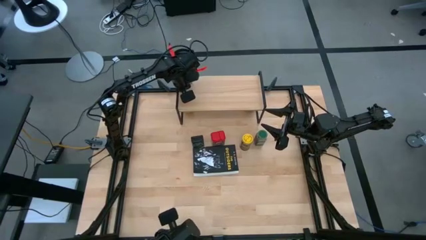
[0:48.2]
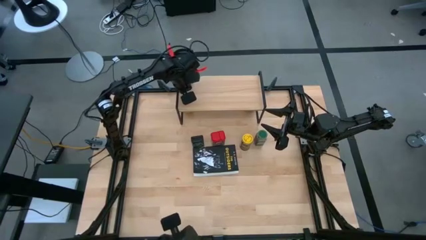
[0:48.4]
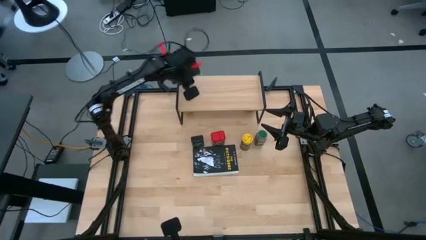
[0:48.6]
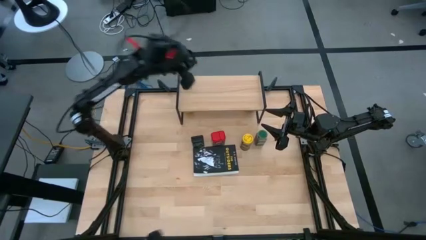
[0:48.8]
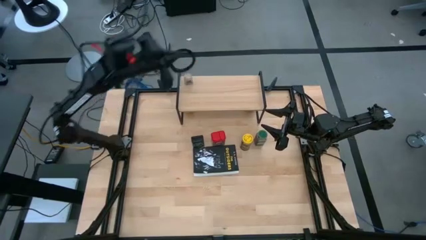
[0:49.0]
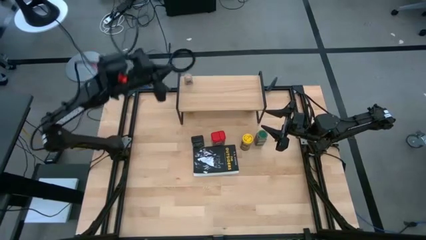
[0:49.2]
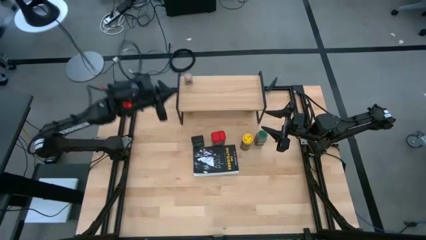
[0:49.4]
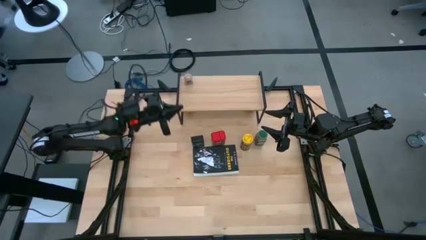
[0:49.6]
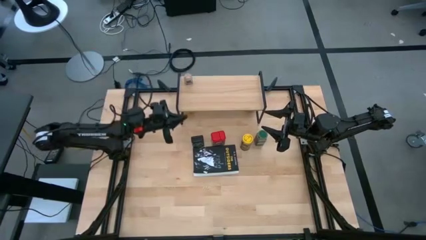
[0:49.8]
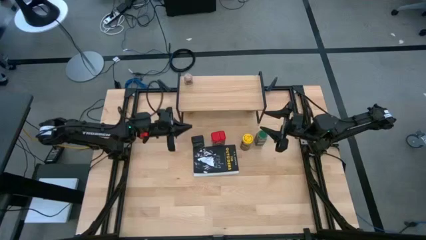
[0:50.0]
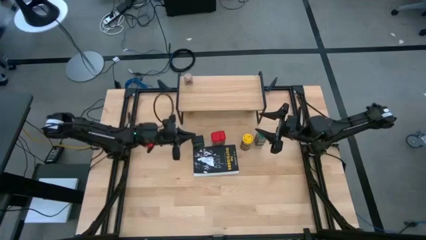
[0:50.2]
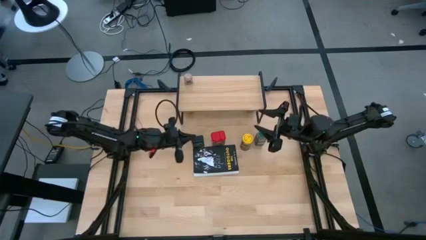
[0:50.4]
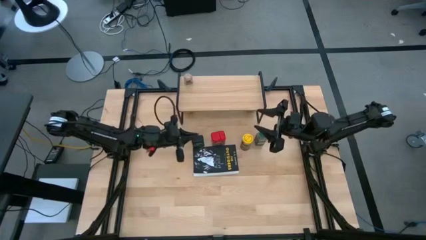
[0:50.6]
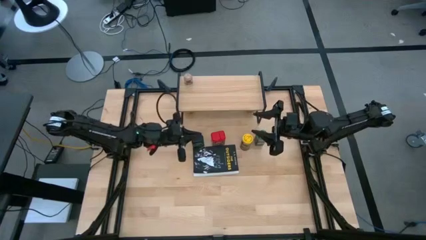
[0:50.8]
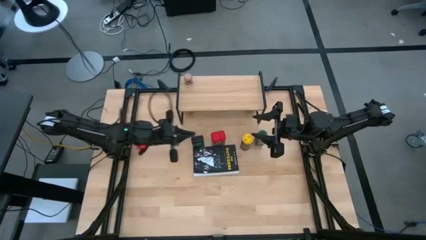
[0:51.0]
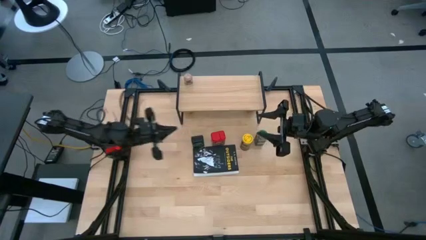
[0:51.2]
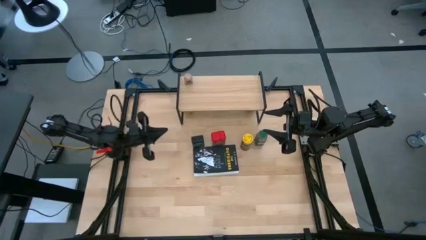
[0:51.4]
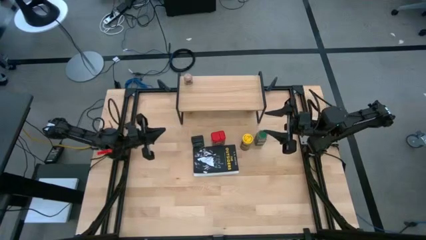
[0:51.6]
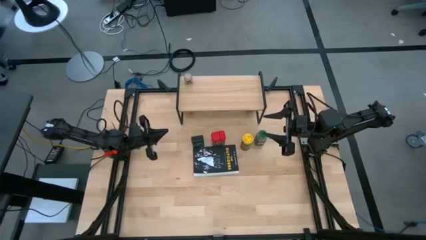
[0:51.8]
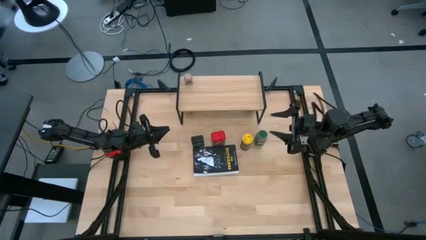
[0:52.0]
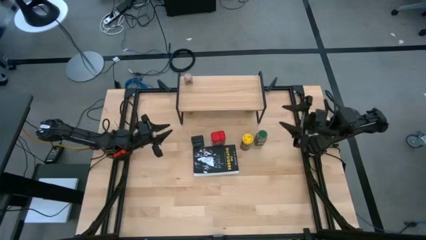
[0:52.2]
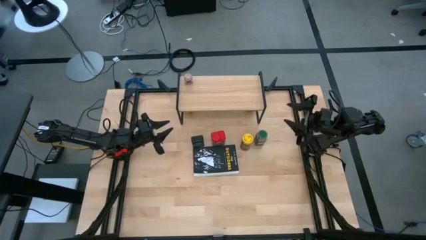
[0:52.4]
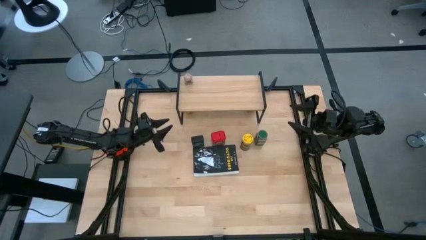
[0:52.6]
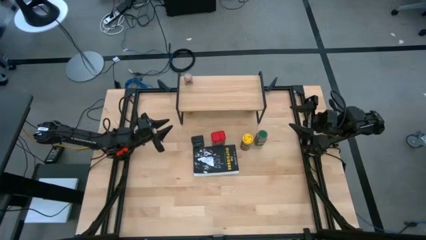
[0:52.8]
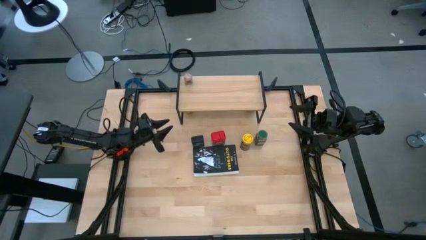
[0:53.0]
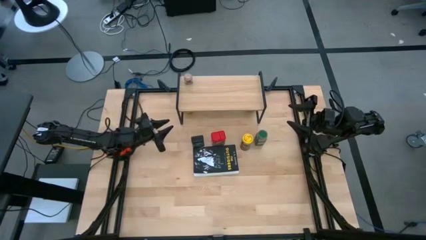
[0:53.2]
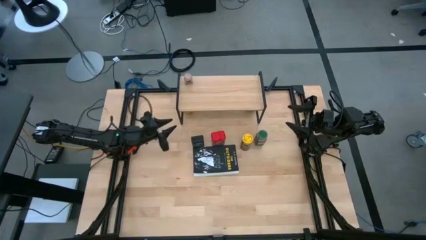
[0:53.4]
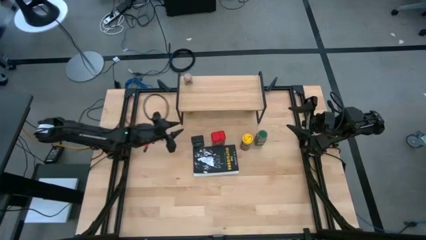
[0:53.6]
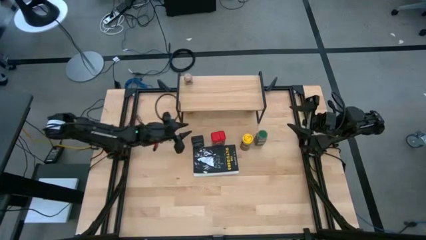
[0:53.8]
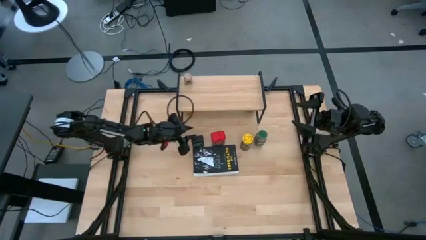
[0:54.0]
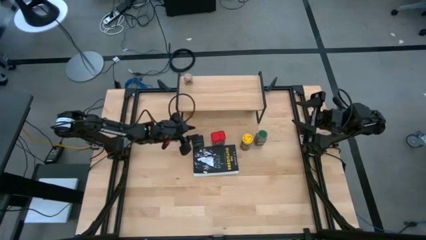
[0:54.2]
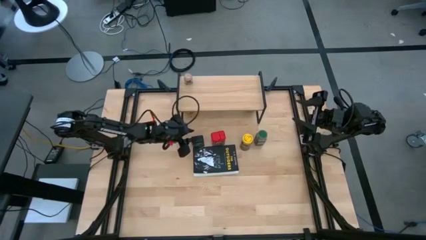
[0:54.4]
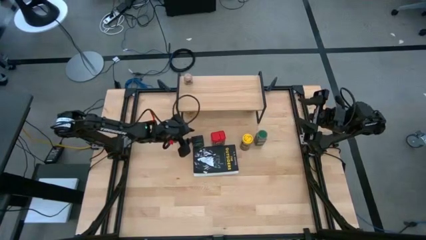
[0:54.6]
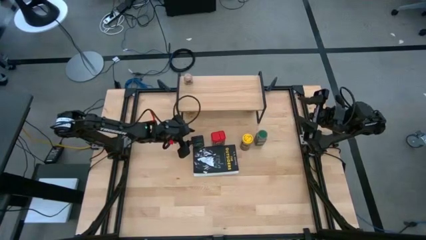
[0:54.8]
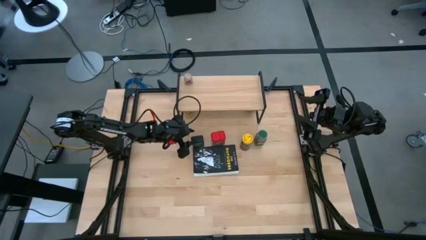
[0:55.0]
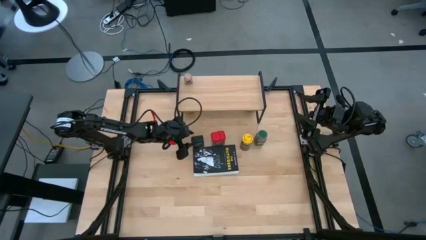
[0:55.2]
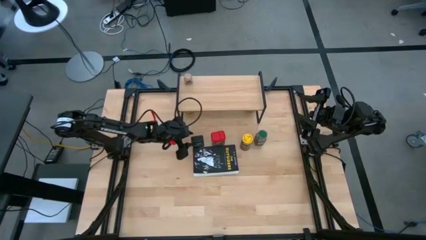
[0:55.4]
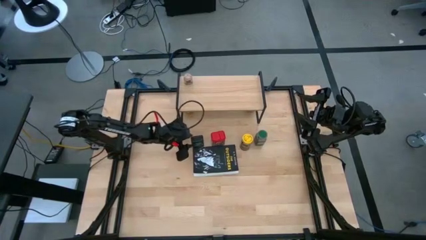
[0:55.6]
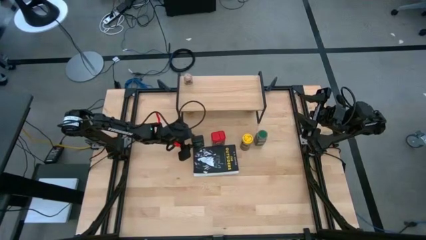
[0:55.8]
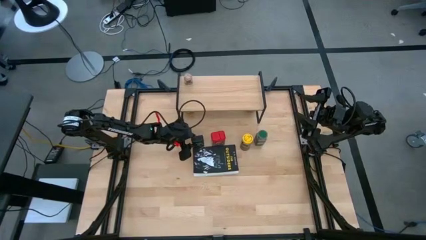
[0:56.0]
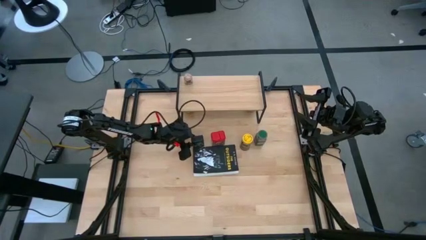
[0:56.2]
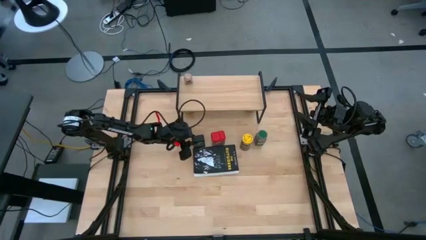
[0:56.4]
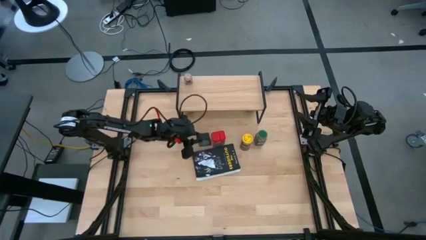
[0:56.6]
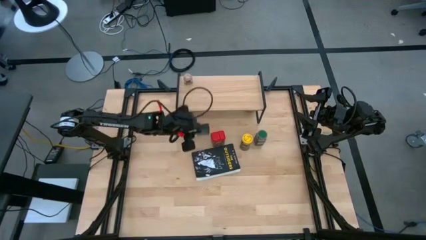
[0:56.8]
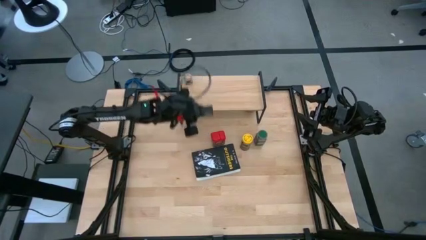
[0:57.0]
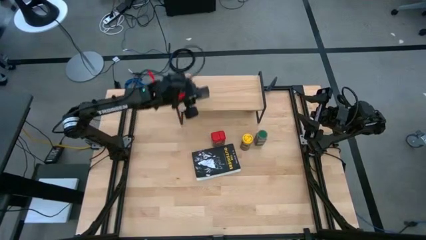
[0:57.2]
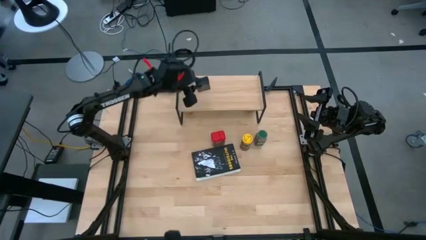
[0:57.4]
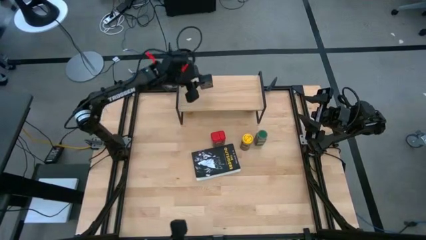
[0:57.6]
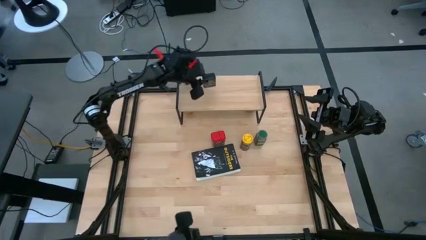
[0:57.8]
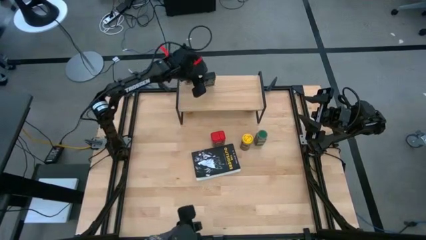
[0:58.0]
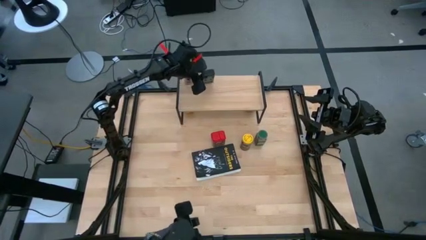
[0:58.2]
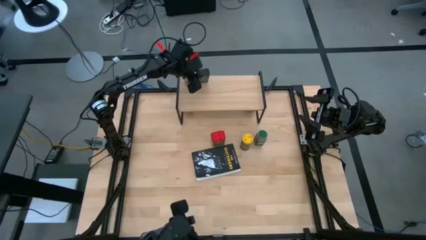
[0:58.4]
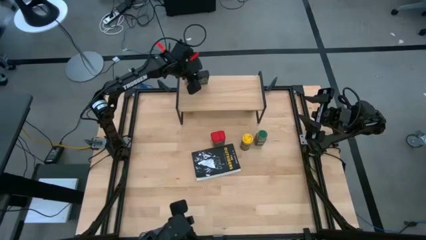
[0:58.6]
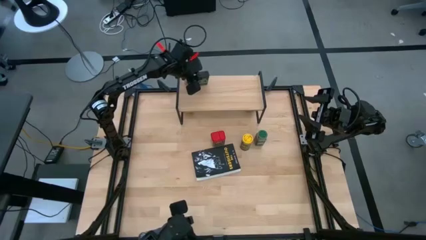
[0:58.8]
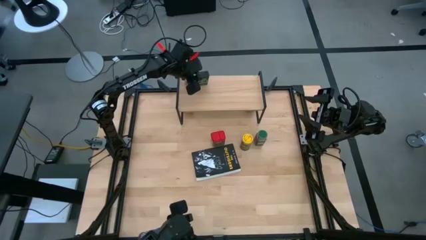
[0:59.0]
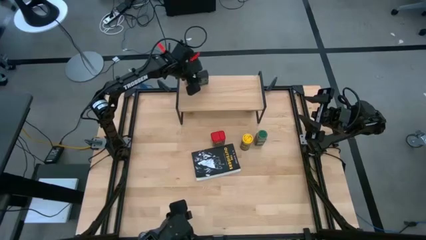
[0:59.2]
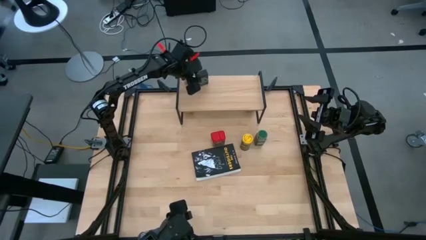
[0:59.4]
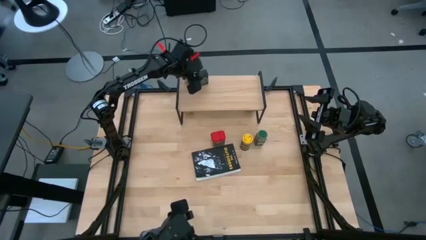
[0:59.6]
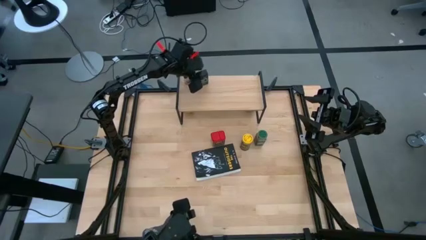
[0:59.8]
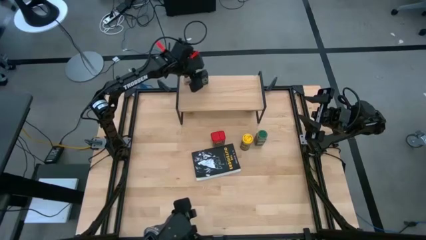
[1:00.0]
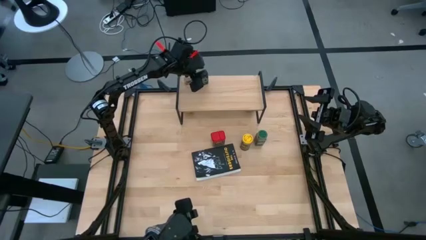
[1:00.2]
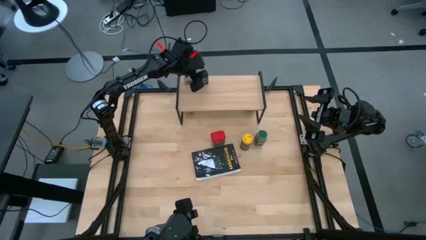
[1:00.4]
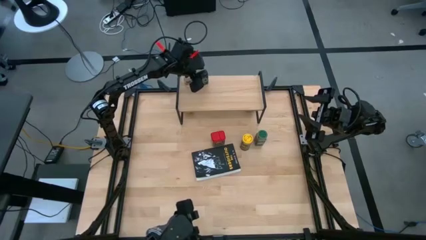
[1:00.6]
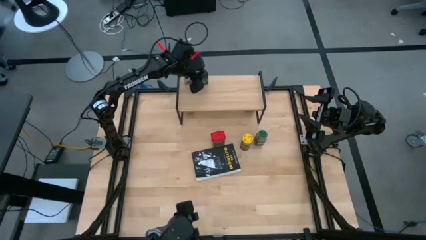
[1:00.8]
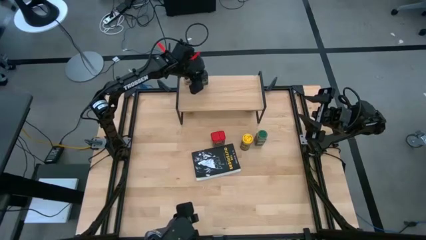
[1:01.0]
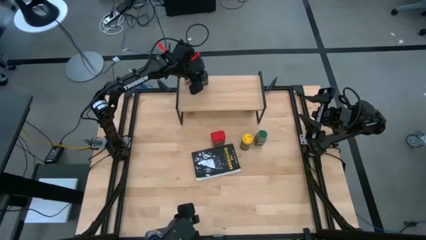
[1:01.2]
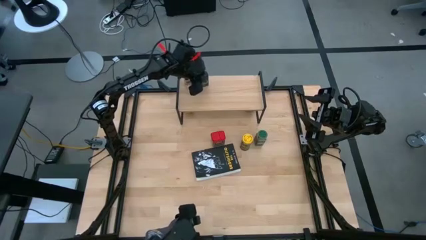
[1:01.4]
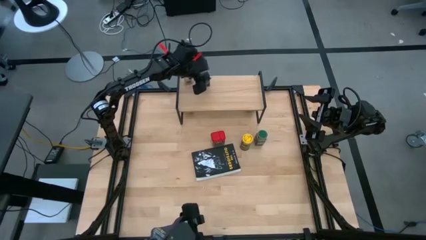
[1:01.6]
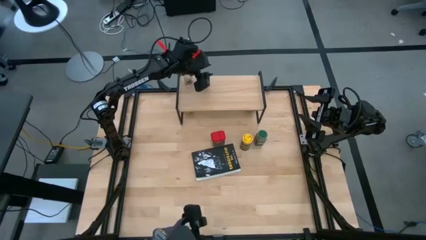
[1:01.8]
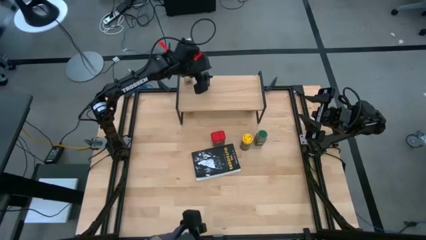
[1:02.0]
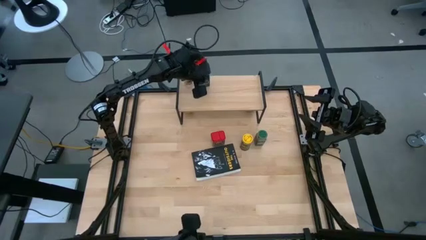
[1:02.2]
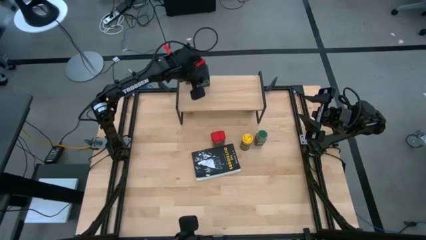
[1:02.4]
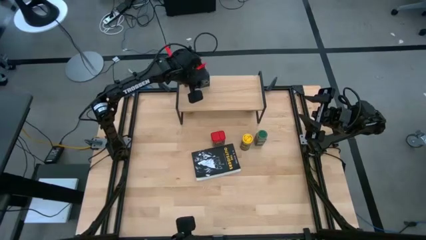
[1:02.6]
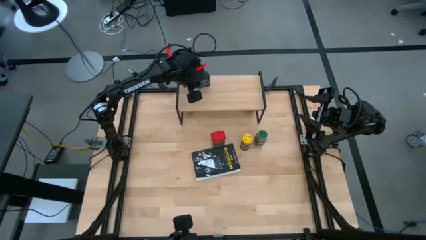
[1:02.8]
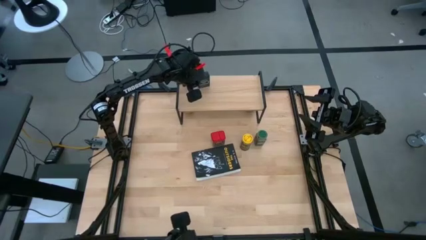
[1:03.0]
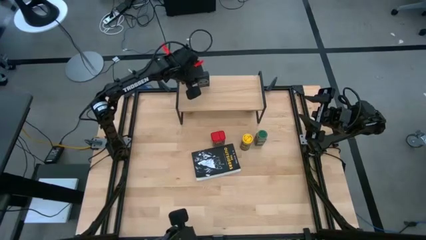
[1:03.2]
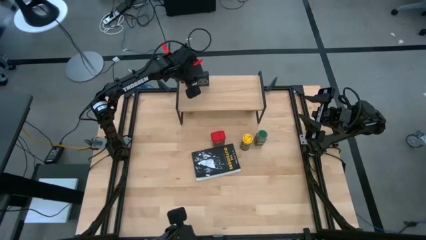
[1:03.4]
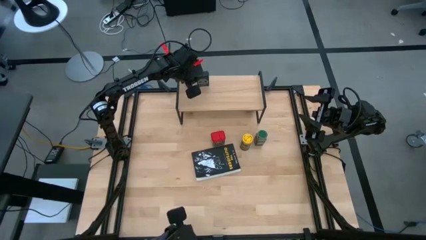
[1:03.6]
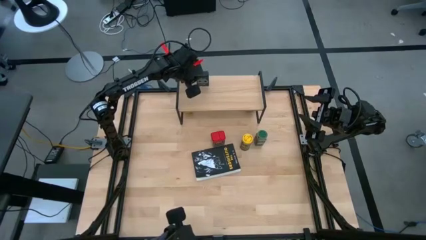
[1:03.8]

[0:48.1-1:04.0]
Task: Shelf spices
Put the black seasoning can on the shelf
